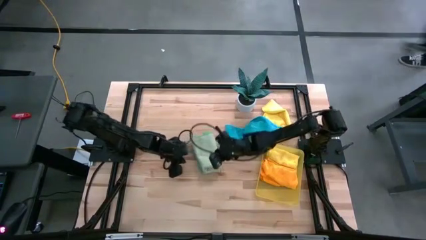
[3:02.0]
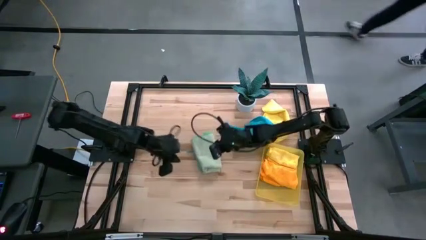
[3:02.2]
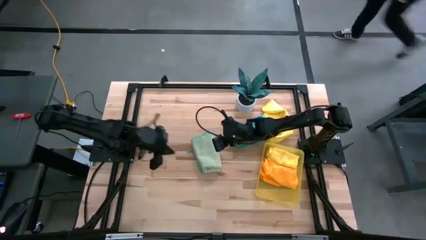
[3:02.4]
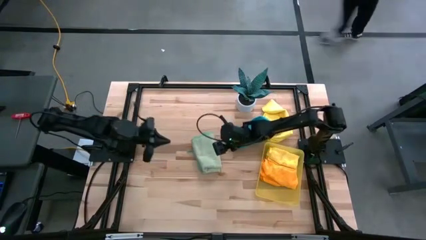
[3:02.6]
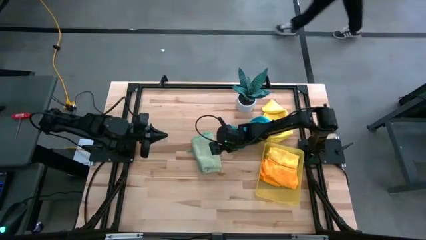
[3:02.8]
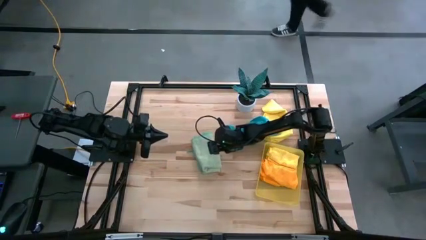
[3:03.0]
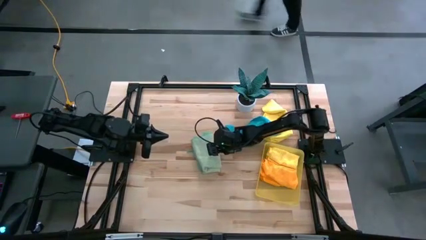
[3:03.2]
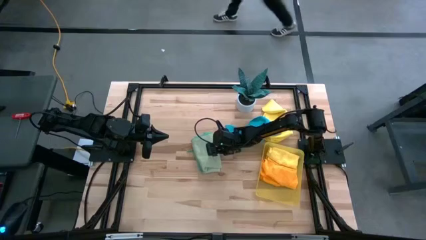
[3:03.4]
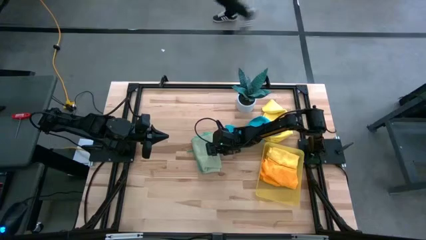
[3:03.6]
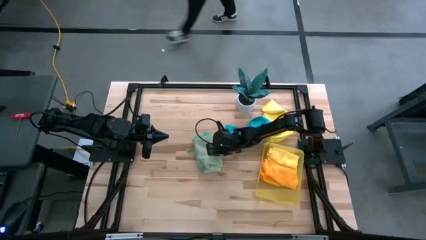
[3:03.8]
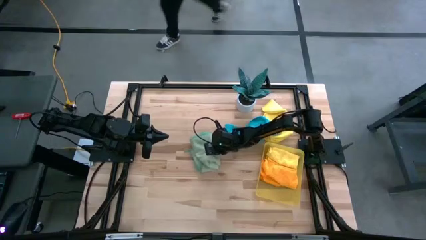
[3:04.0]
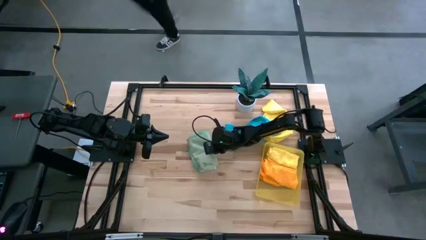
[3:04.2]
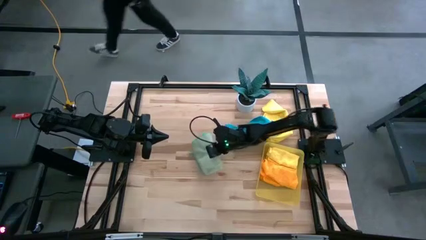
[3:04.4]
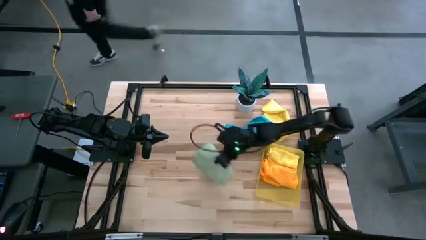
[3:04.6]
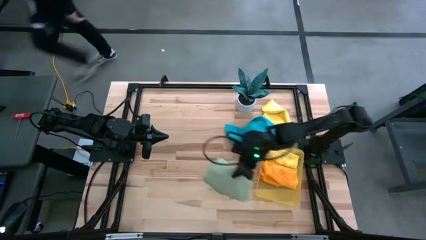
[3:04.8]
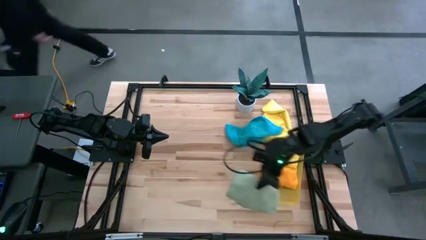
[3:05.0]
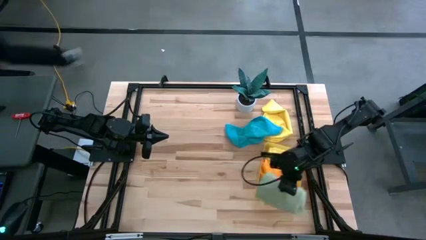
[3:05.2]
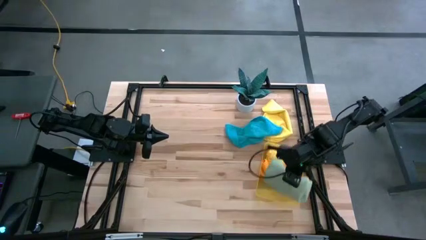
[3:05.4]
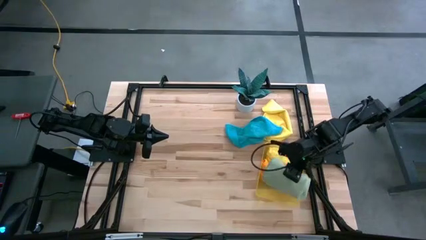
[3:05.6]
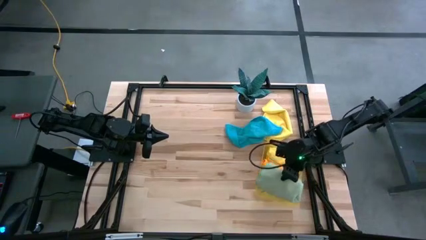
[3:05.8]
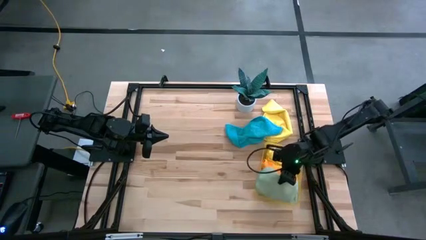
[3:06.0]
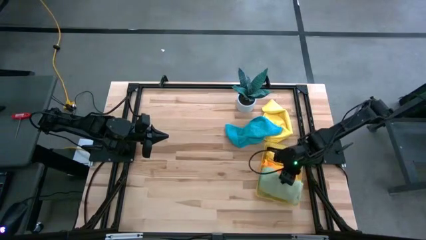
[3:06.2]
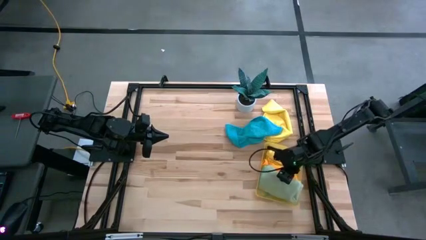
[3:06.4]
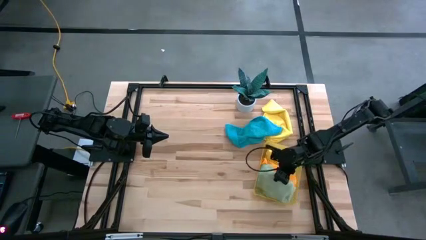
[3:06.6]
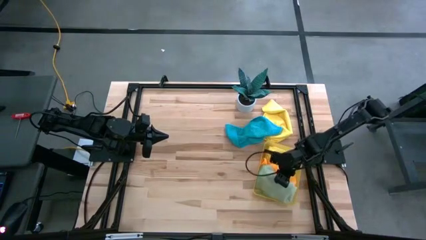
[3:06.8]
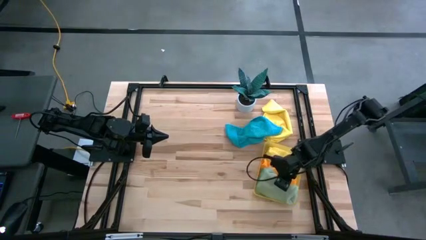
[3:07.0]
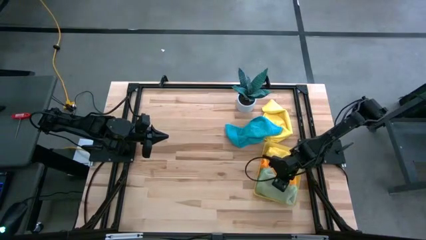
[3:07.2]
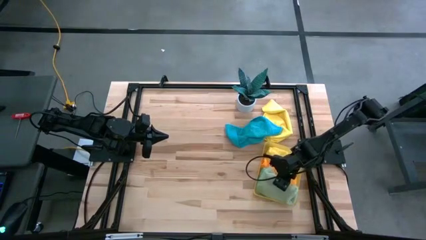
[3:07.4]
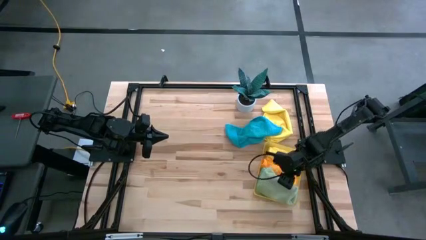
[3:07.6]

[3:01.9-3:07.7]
Task: Fold microfiber towels
Put the light green microfiber cloth into the yellow bin

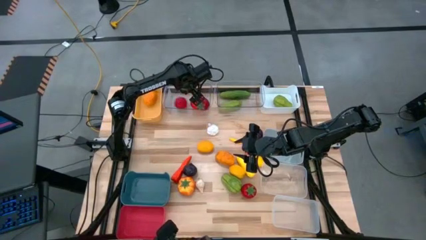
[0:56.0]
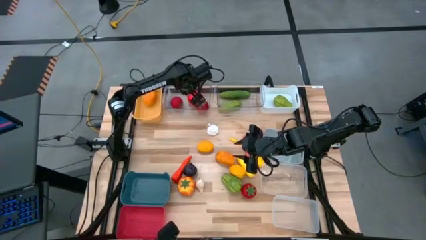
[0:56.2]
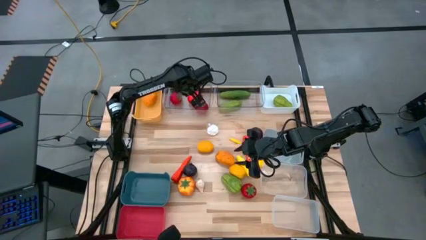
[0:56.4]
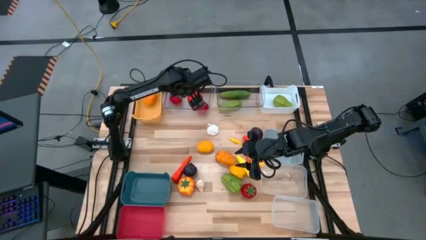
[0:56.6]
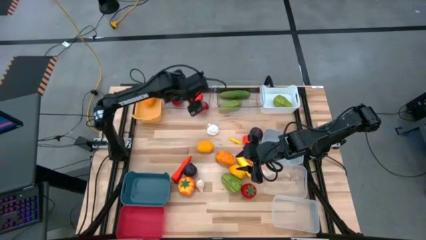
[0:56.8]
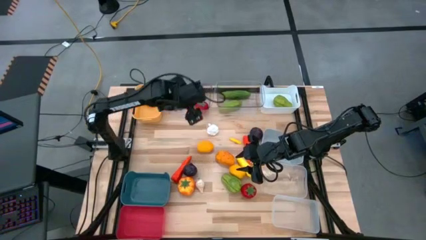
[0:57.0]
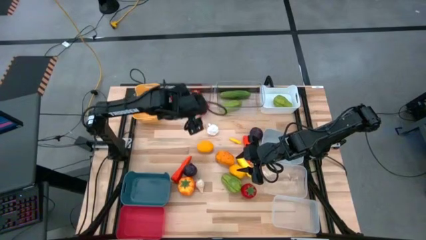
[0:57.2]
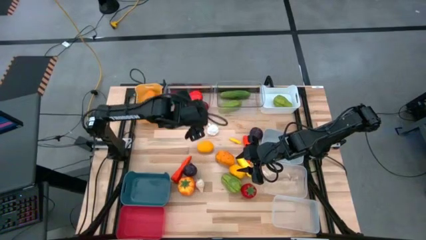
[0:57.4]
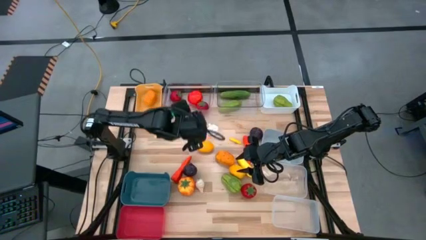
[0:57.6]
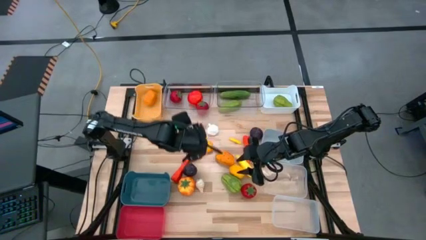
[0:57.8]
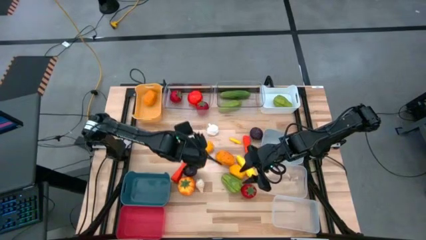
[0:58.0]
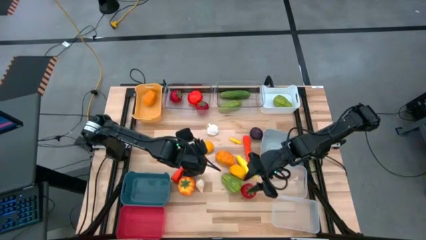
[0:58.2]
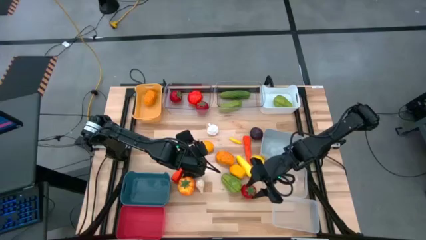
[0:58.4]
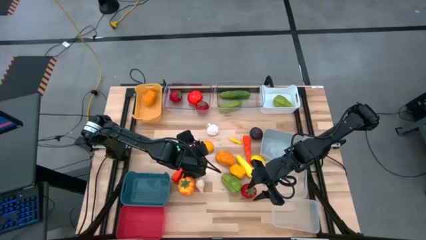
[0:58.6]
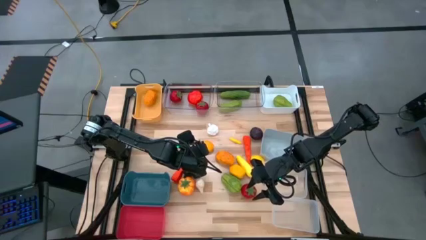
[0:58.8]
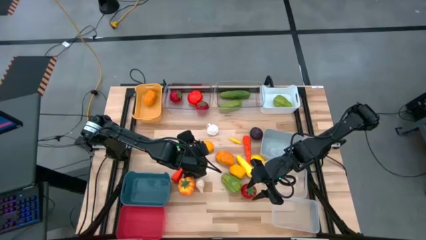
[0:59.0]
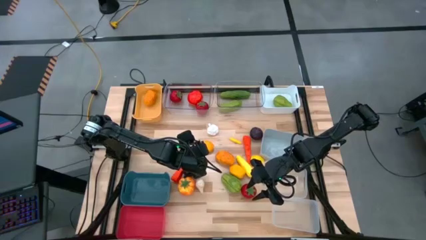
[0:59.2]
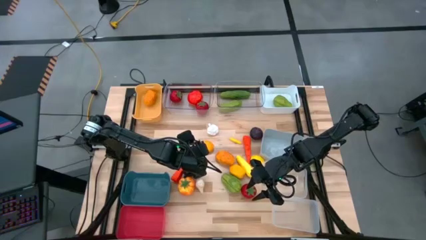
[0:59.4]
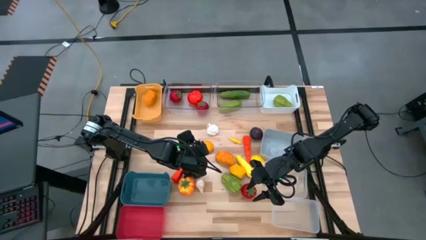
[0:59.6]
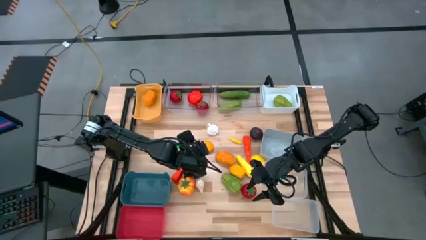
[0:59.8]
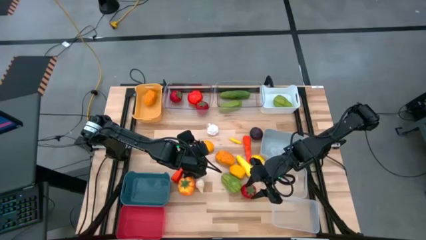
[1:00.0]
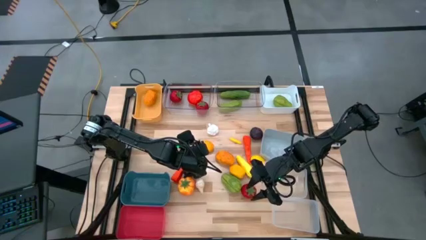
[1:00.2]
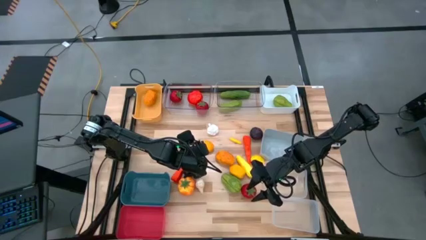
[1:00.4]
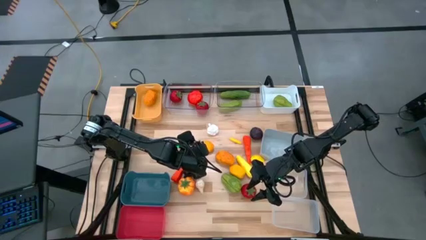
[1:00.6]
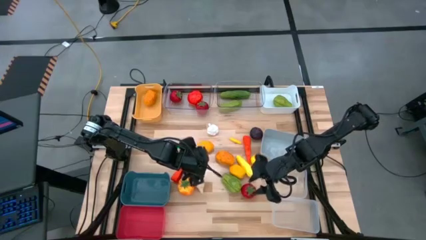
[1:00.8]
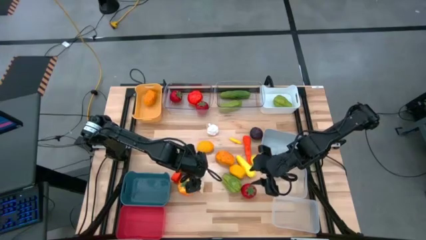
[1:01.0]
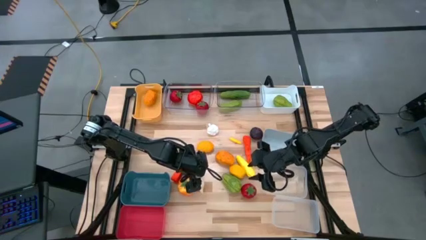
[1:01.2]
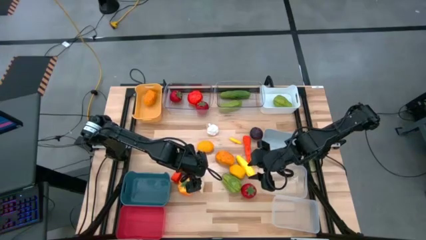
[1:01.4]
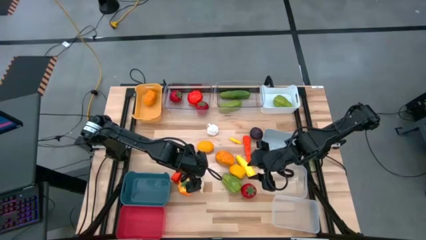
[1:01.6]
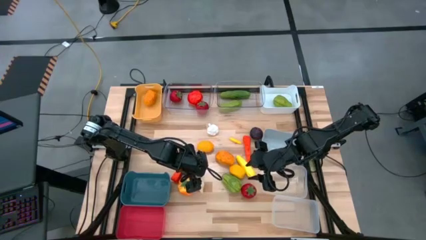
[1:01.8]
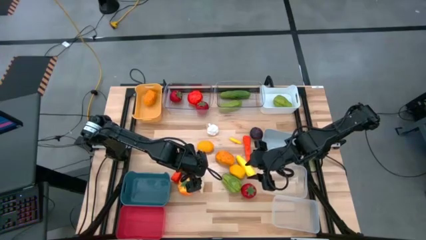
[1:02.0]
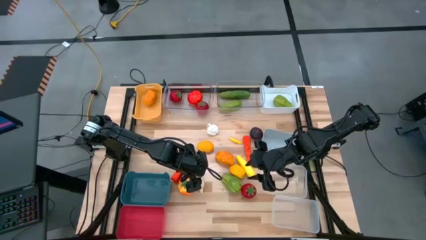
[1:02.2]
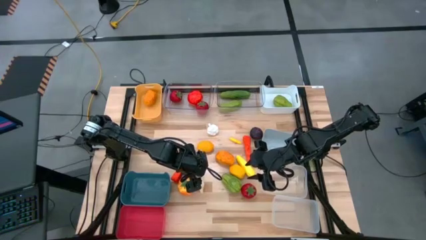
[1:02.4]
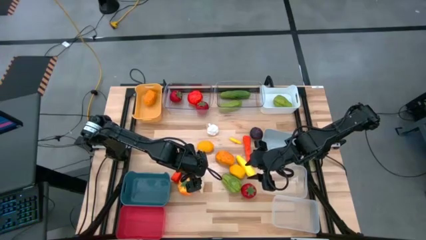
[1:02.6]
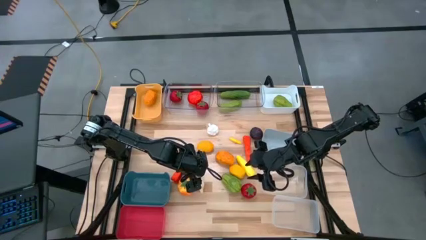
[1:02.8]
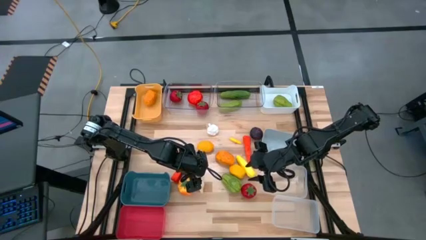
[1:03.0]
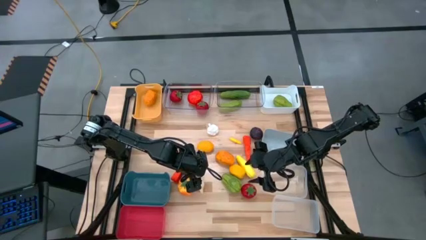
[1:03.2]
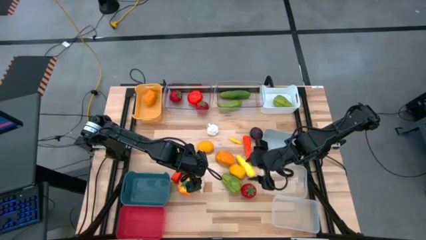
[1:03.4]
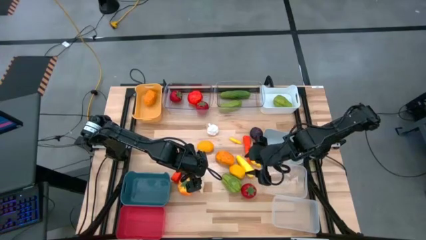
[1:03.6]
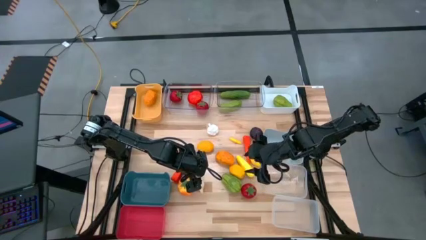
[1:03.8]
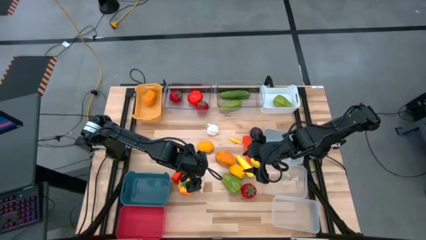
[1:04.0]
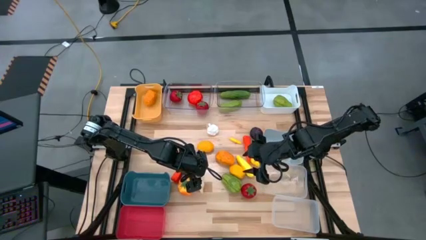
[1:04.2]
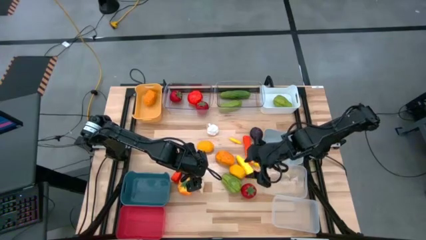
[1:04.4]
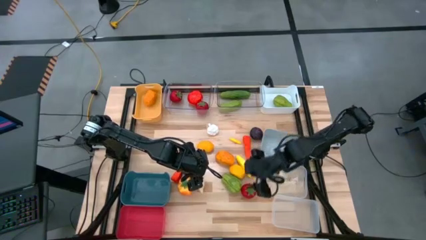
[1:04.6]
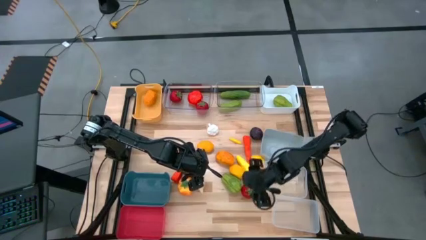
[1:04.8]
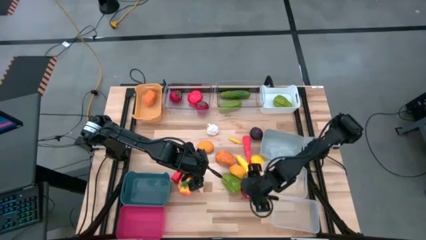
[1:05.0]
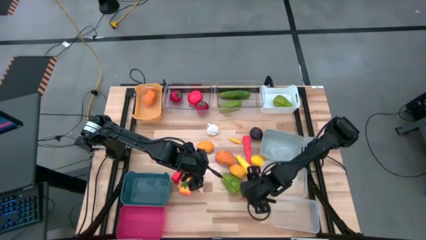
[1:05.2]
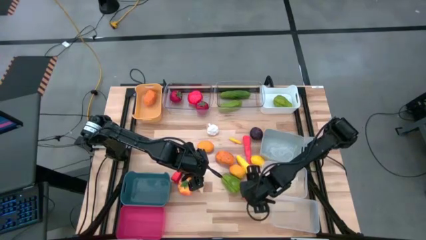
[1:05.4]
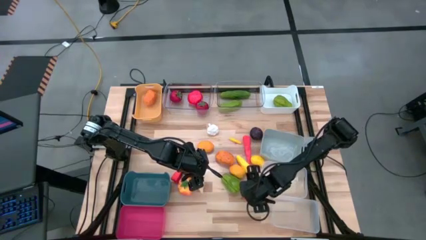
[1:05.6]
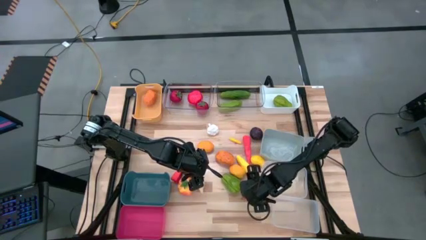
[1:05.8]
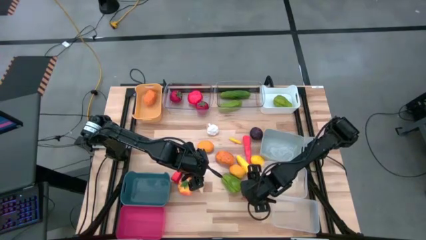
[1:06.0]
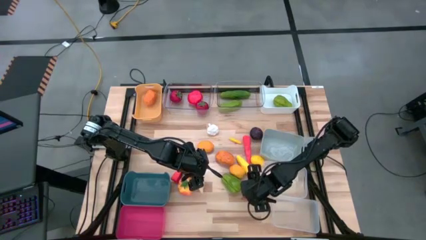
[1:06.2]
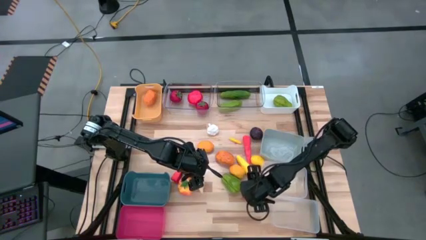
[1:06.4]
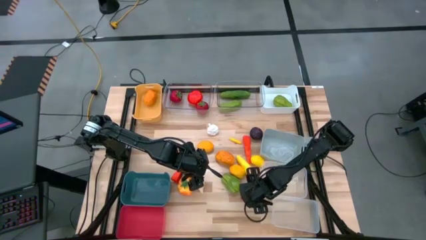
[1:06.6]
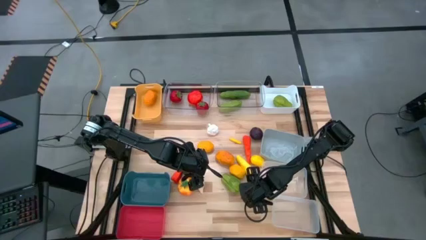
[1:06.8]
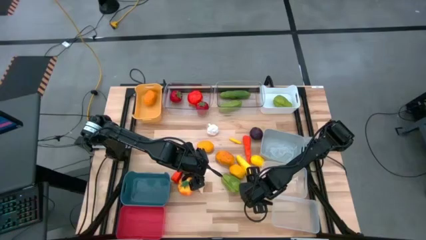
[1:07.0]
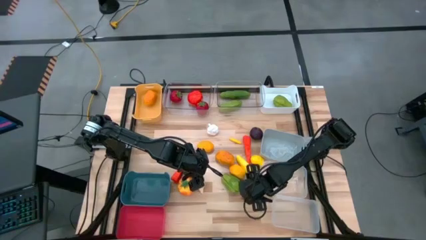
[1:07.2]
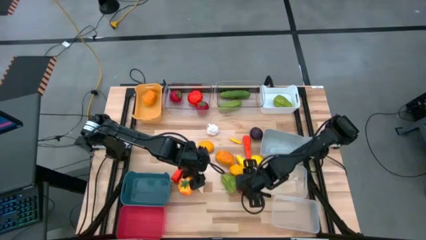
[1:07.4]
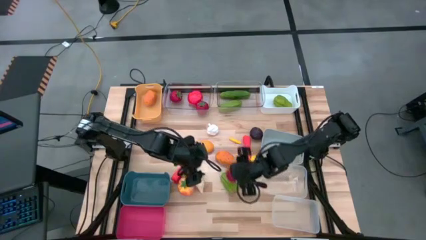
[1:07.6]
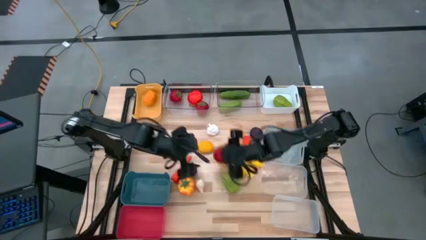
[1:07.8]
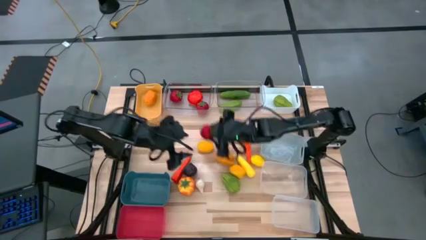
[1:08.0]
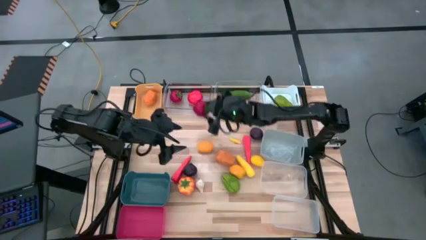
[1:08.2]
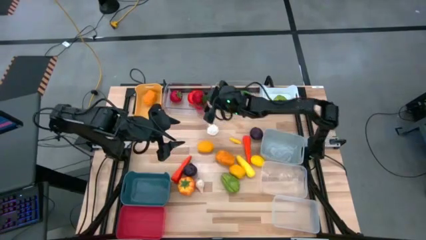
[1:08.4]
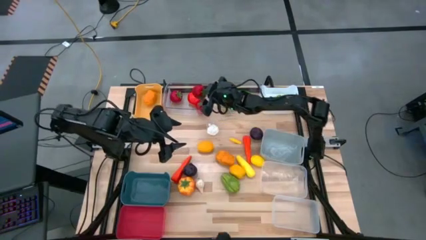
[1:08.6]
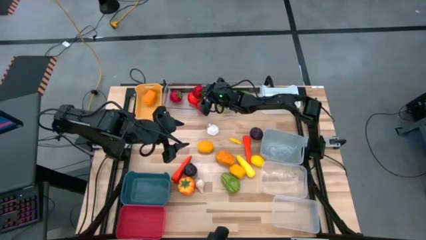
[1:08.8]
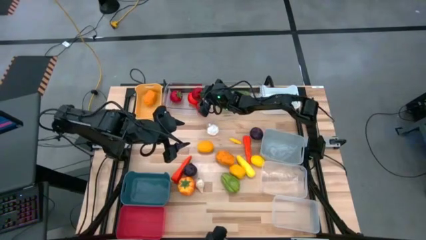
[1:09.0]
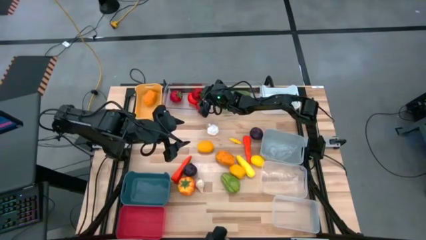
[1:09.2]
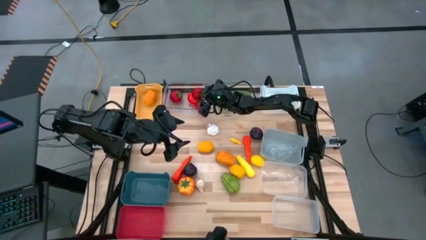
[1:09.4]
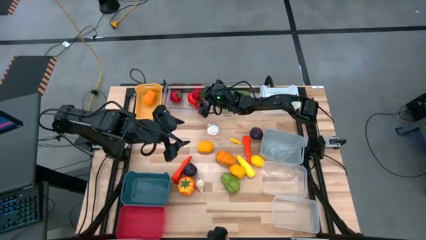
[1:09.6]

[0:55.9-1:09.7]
Task: Sort produce into baskets
Put the red tomato into the left transparent bin
